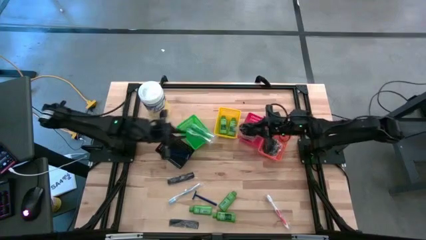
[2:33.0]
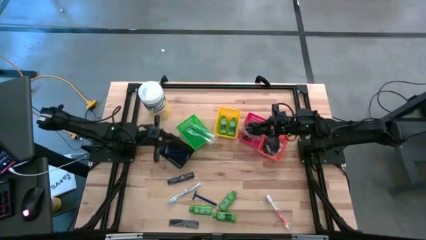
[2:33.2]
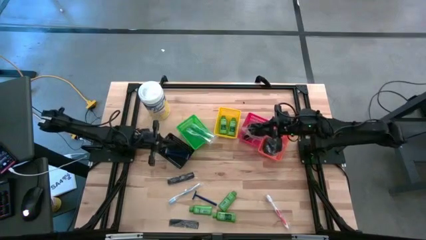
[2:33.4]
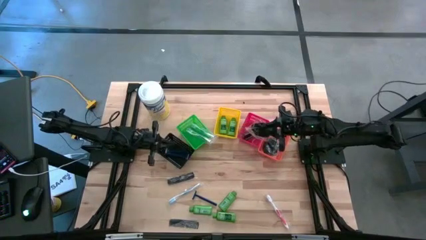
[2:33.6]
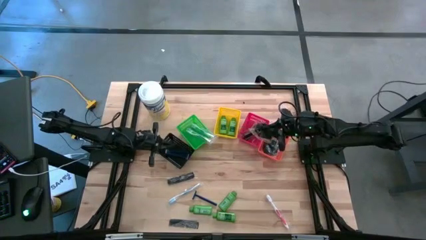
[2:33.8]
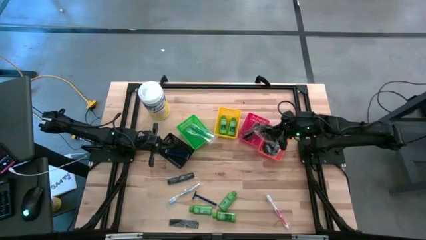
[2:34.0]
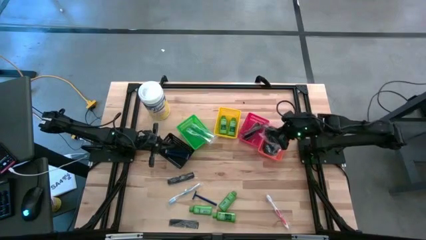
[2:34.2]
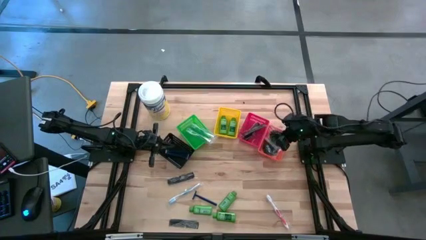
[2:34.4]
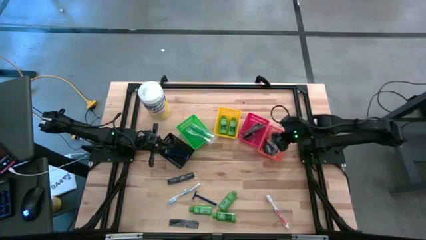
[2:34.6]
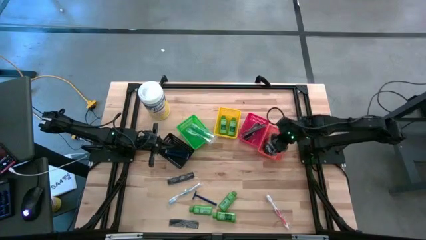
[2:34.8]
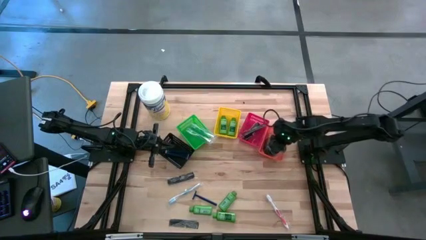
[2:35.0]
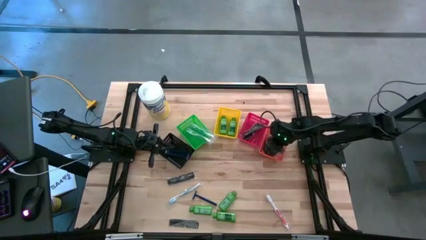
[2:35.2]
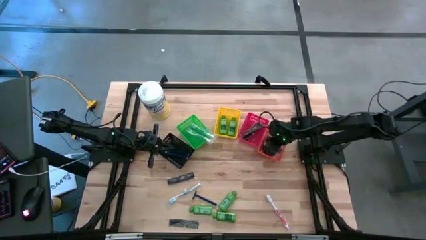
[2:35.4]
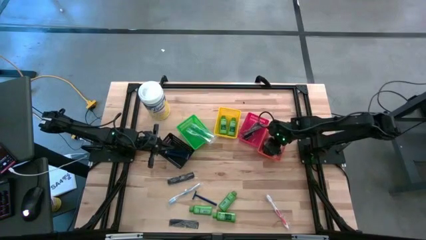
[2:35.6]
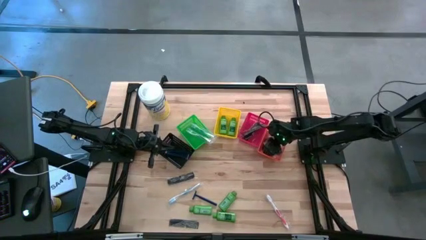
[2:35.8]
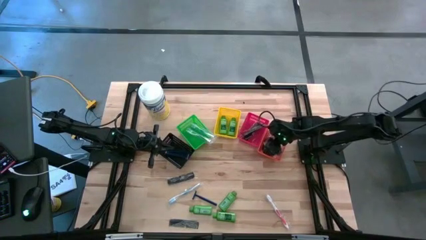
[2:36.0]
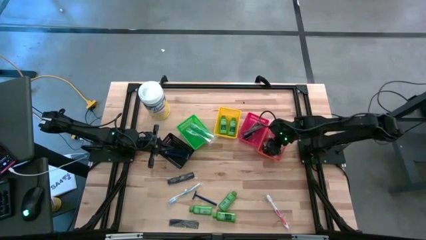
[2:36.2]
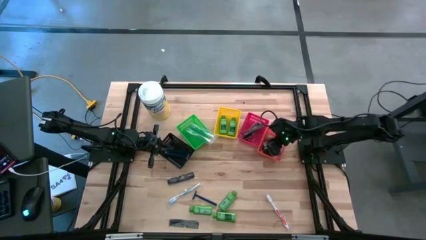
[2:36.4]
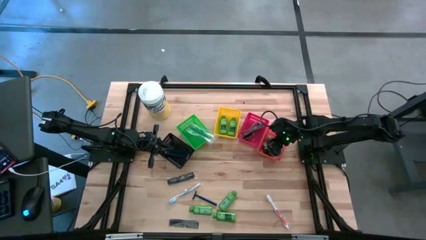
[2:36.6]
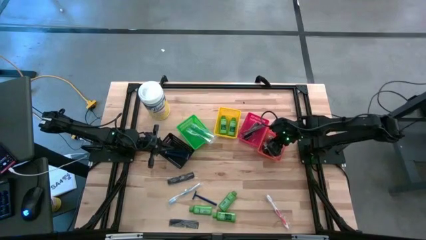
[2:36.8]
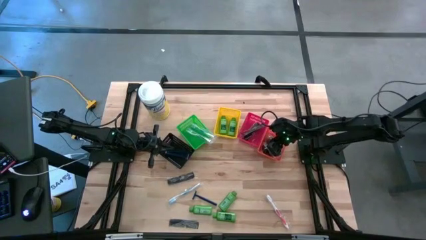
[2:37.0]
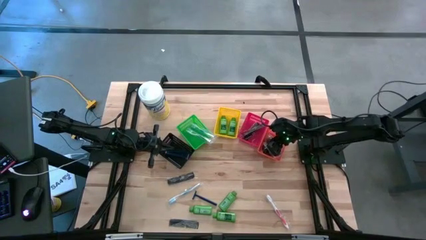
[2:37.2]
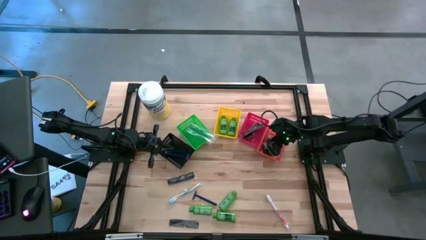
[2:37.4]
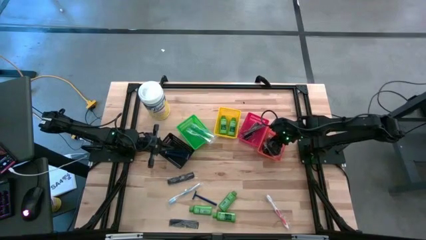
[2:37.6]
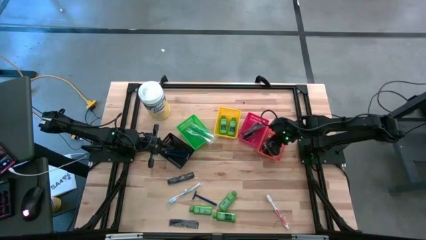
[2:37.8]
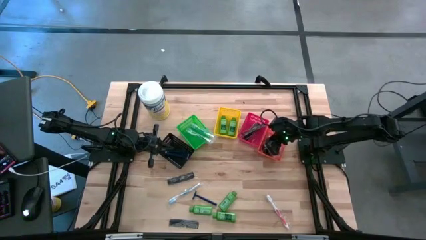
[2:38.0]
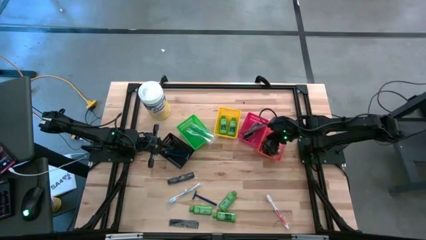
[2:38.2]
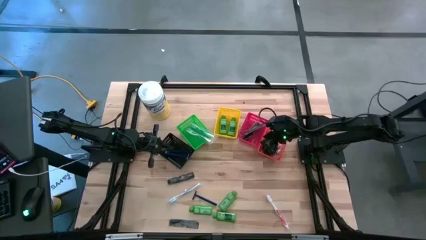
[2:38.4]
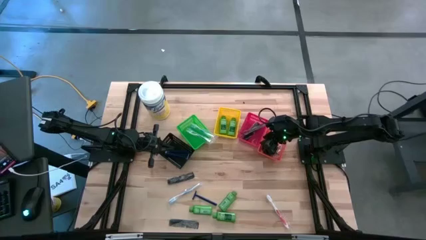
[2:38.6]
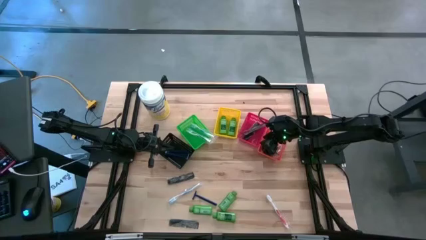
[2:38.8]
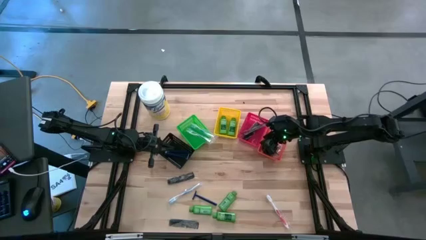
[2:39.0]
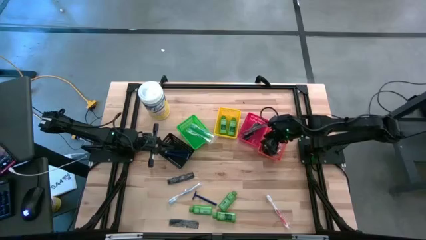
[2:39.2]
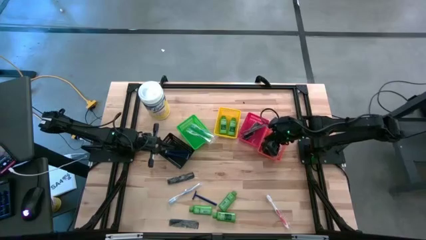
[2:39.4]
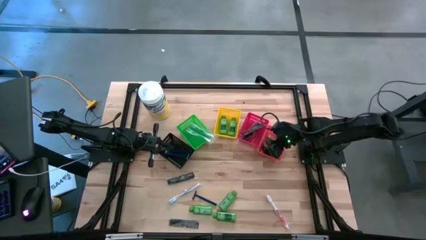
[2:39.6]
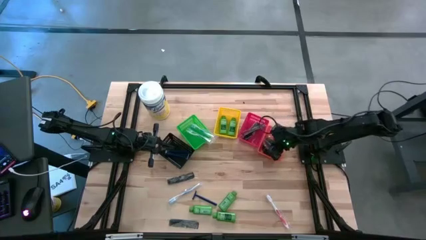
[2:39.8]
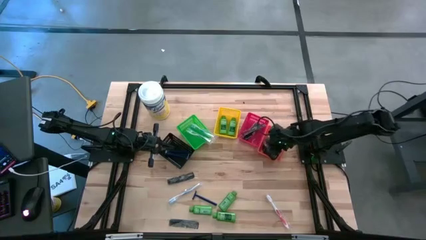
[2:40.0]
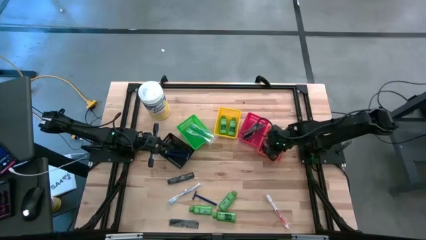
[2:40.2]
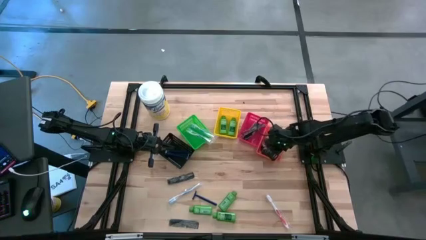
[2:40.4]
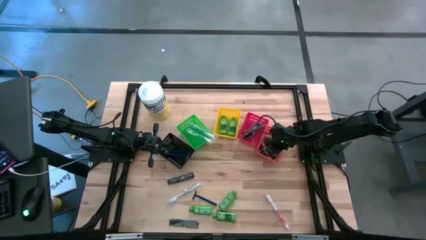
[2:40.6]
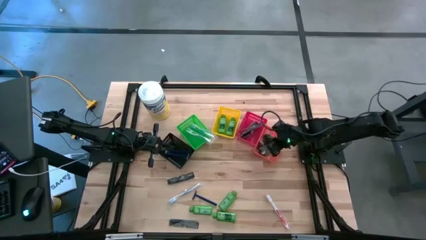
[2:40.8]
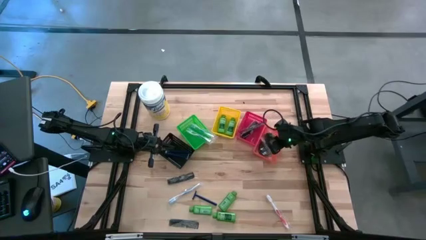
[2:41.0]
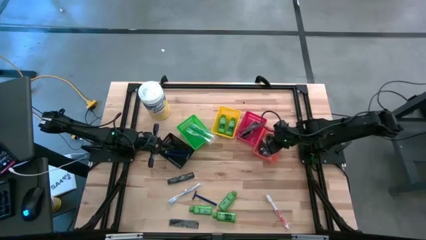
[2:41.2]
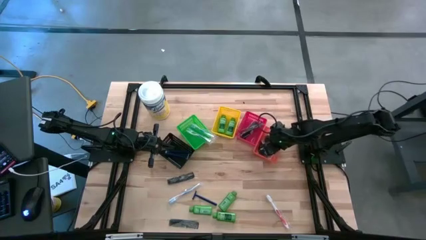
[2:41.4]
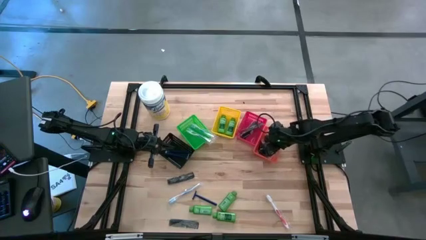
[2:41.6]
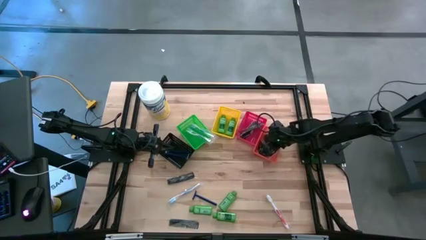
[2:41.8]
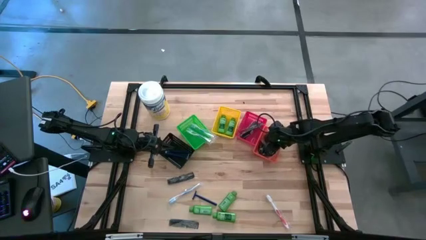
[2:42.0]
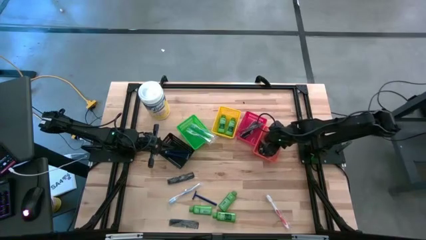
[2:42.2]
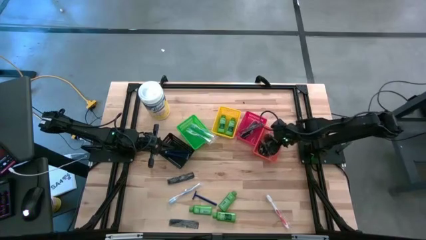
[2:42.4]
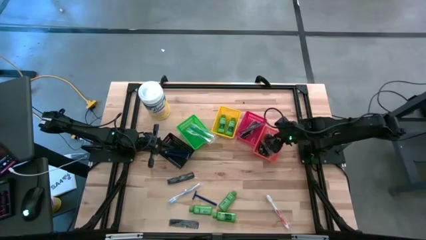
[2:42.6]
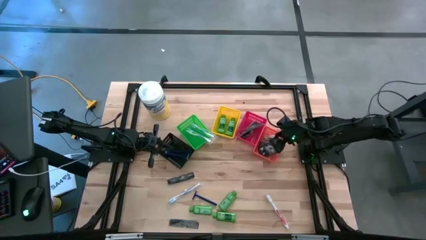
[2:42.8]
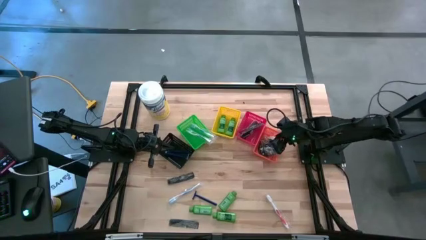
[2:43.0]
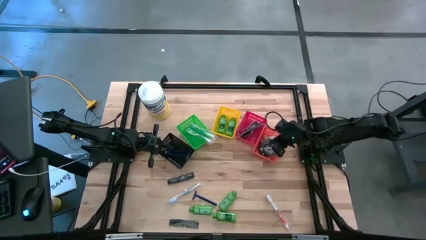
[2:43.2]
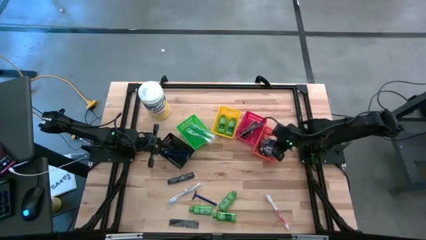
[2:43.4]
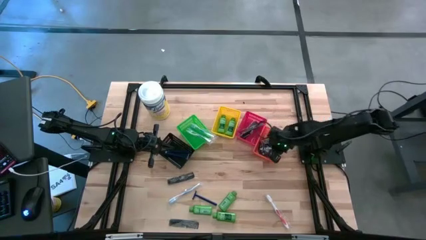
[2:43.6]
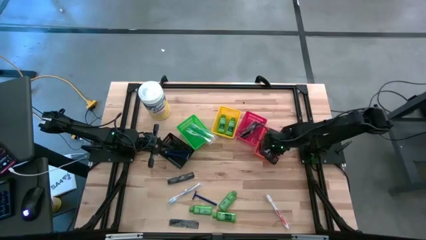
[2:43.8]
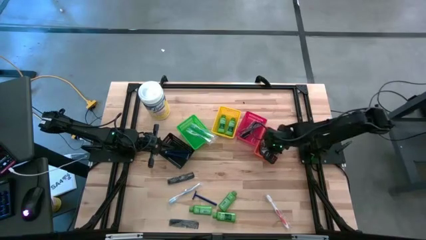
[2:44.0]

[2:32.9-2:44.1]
Task: Pick & Place Travel size toiletries
Put the black hair brush into the orange bin

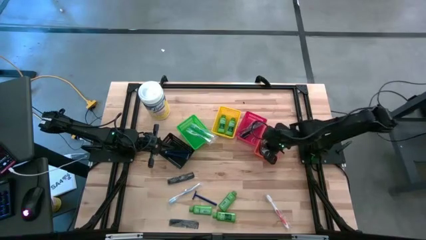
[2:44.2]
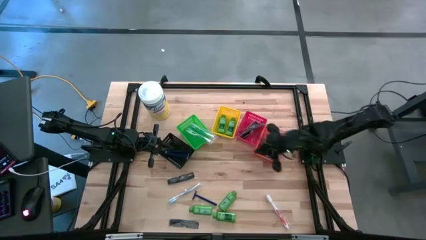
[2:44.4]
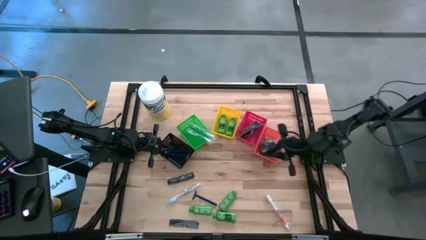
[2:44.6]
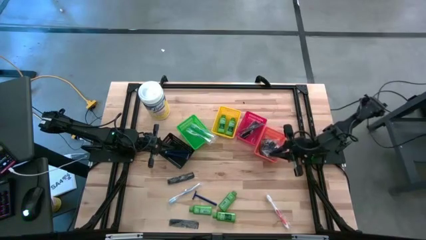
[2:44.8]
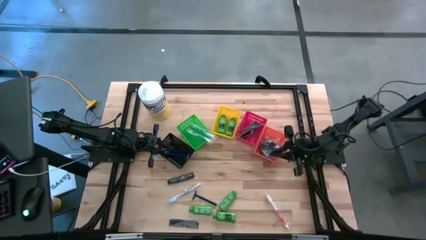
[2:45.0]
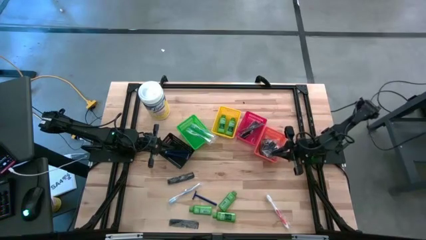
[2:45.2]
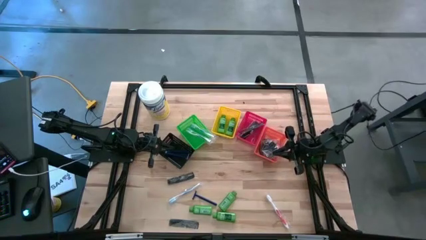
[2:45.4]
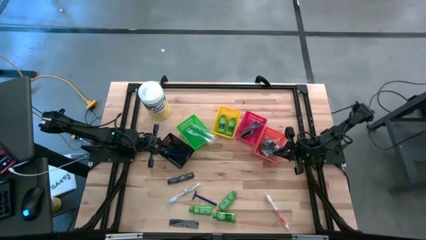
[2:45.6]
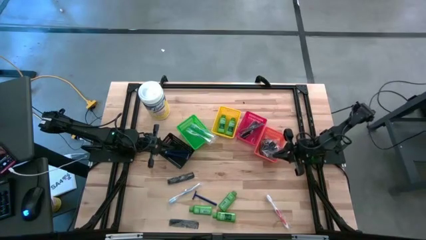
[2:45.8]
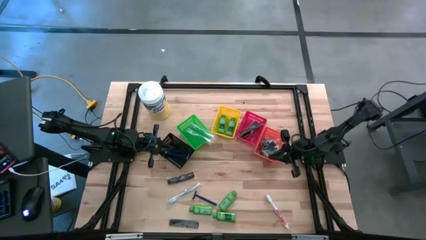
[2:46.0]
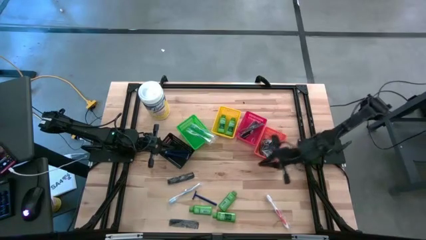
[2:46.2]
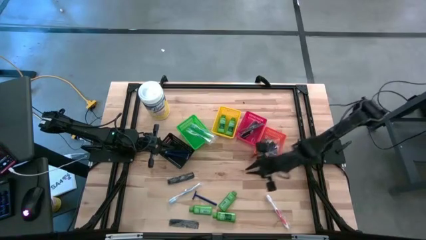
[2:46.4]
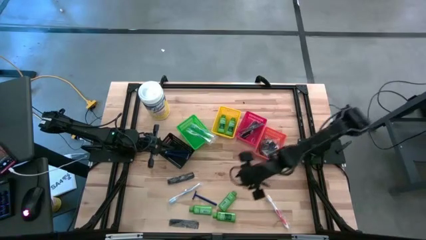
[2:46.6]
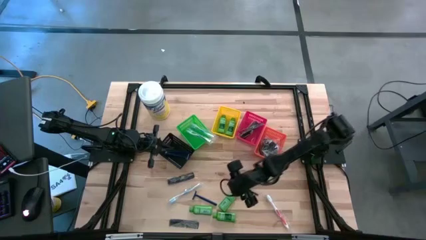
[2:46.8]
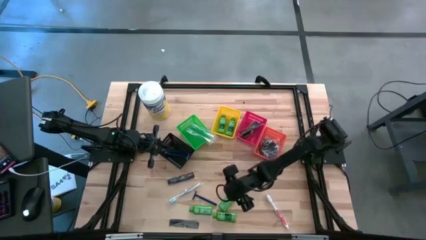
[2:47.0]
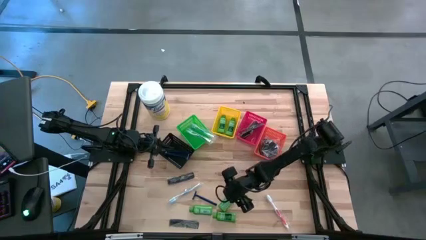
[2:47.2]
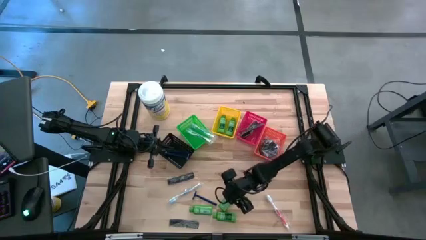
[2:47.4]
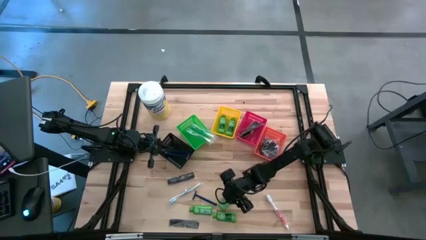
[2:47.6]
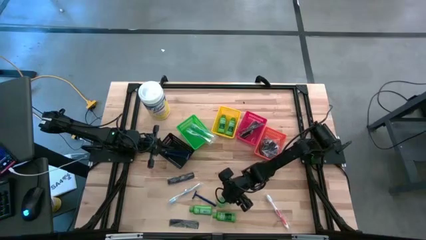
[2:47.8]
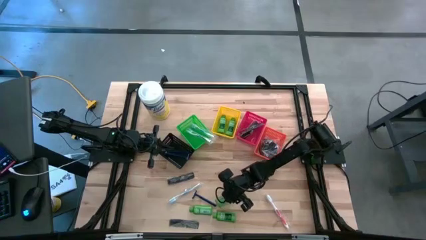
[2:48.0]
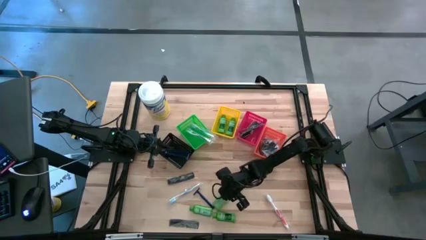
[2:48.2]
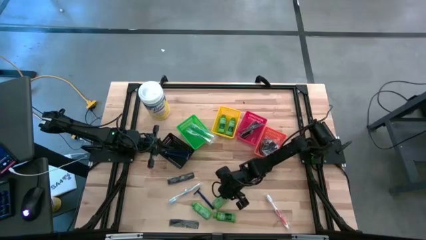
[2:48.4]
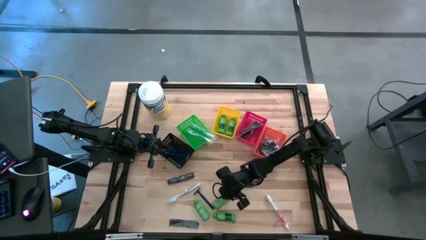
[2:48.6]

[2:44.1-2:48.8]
Put the green shampoo into the yellow bin

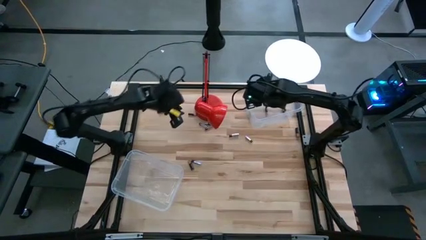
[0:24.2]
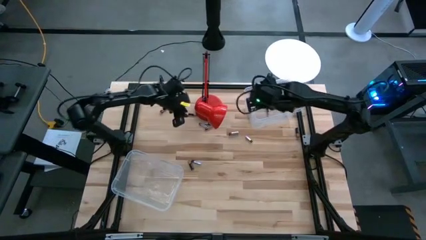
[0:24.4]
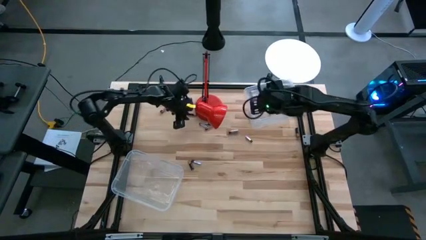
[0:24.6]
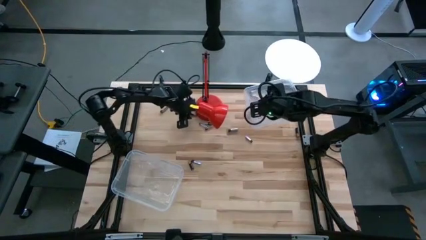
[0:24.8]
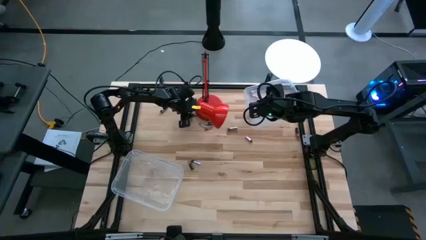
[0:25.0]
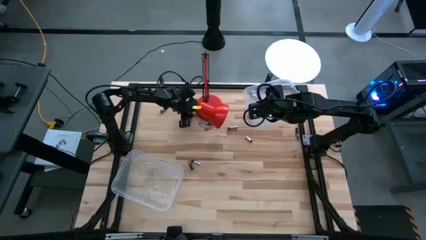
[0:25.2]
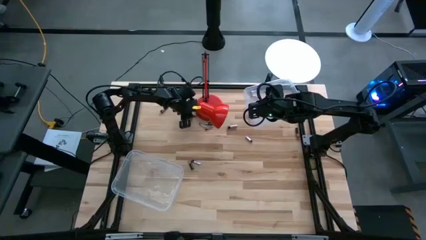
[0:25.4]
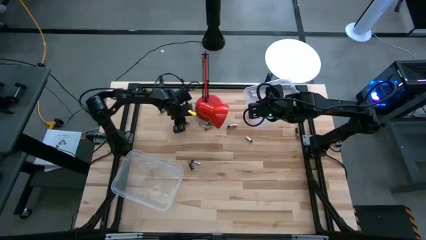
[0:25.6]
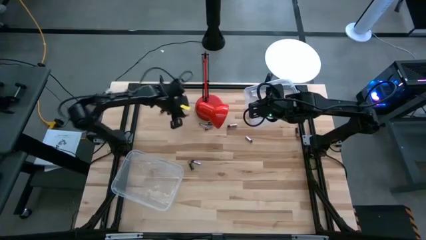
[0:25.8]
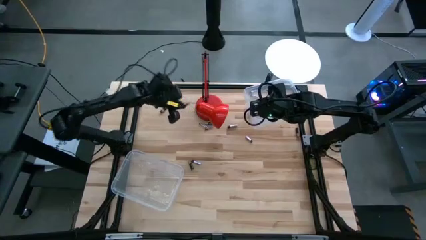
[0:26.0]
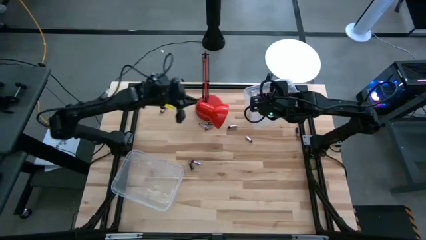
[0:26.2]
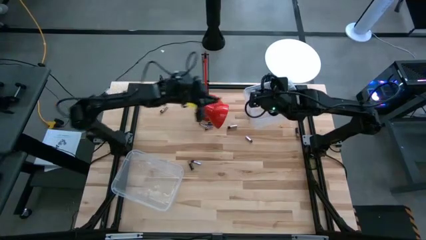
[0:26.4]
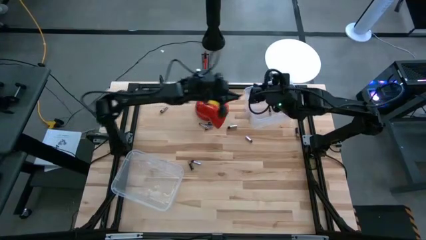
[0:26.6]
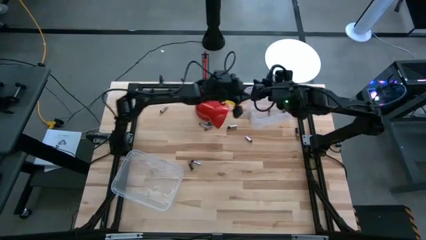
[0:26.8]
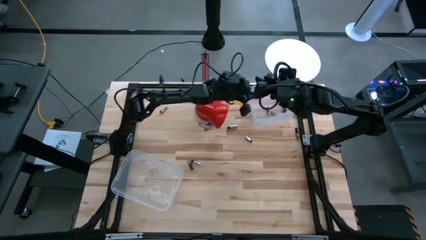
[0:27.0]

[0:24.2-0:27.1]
Task: Sort batteries
Put the black battery into the top transparent bin
